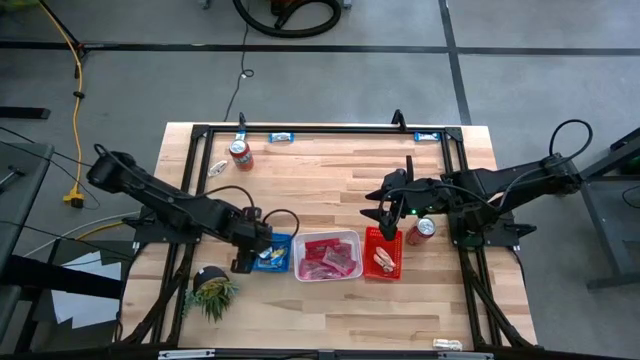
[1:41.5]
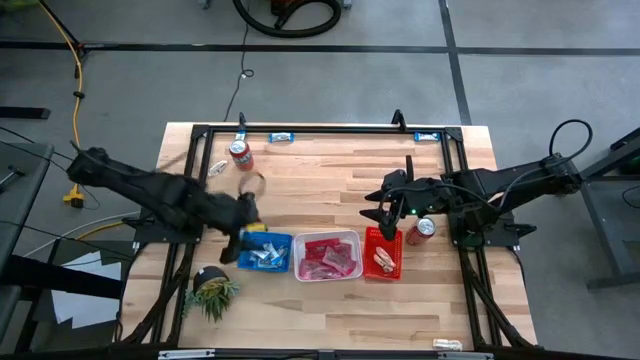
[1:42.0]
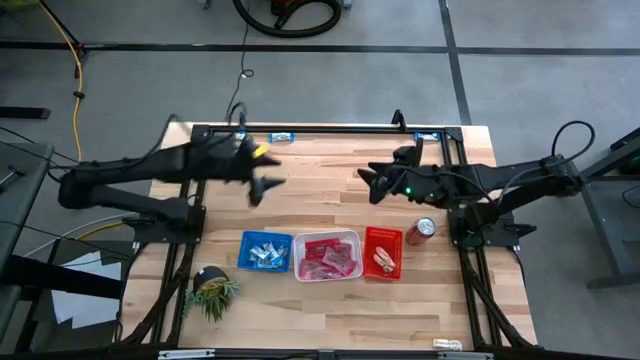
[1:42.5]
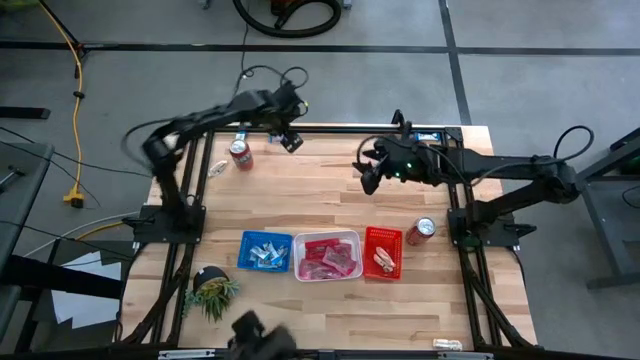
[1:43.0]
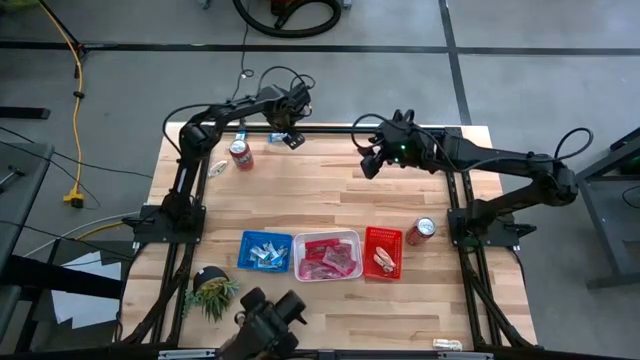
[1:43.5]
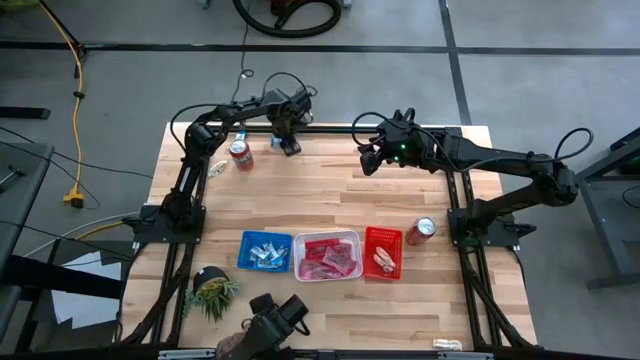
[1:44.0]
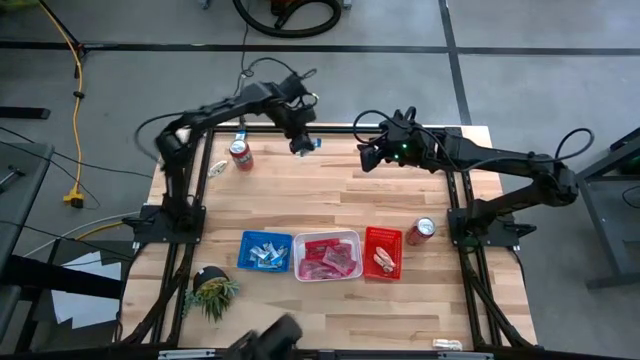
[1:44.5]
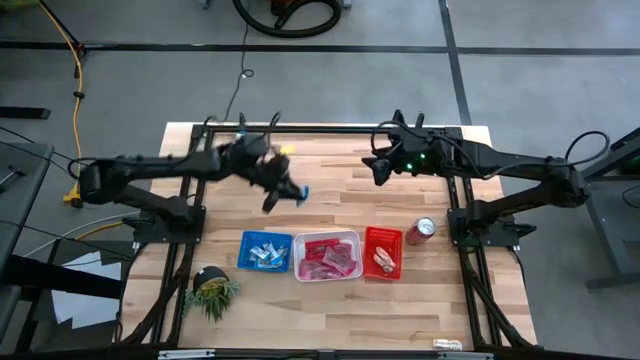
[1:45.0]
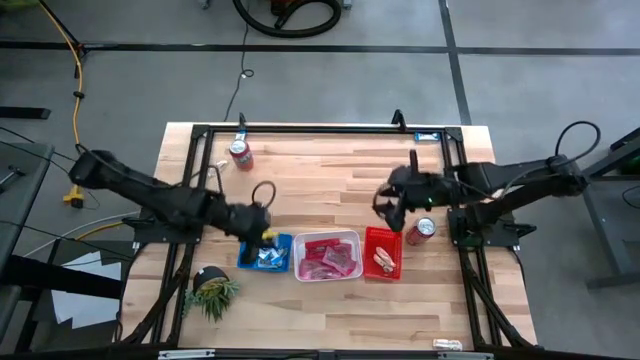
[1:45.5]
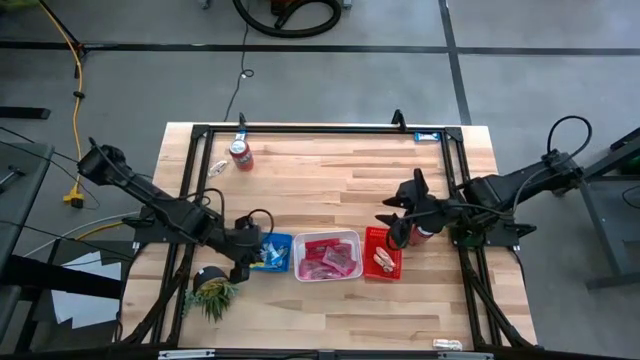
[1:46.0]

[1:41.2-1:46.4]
Task: Sort candy
Put the white chocolate into the blue bin

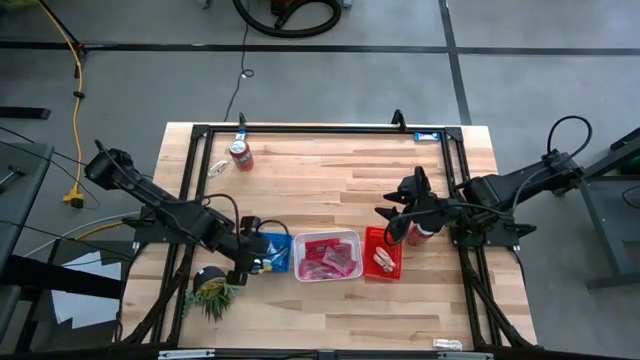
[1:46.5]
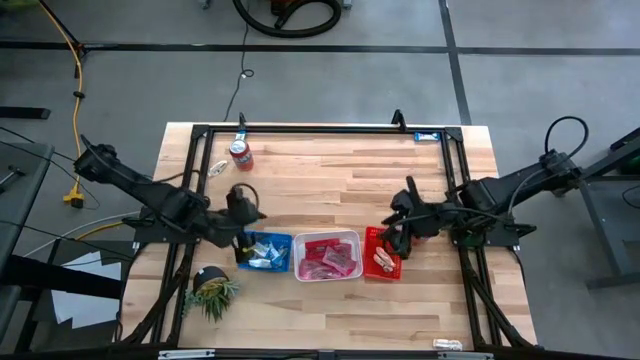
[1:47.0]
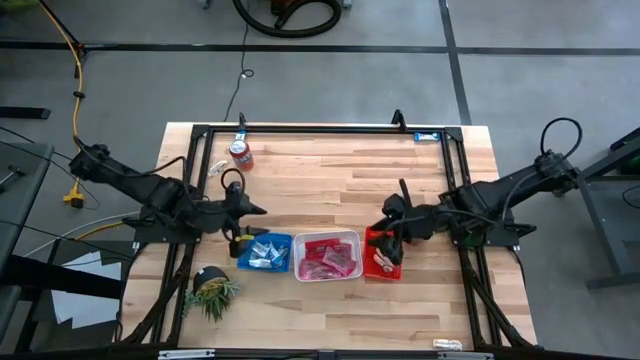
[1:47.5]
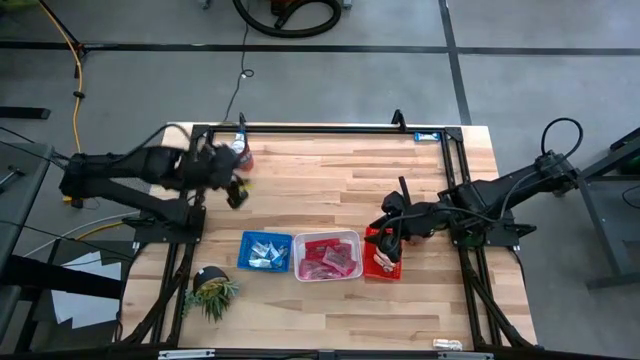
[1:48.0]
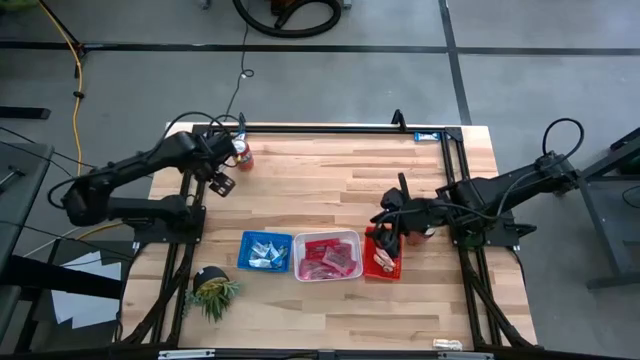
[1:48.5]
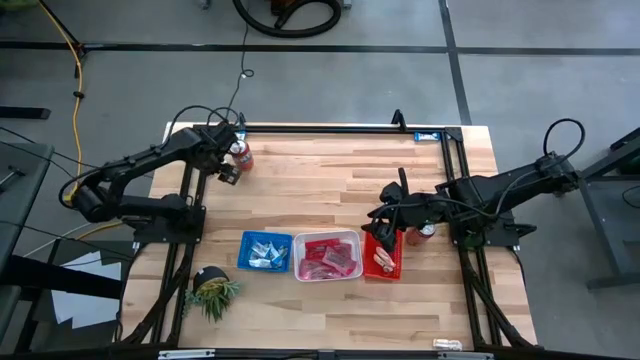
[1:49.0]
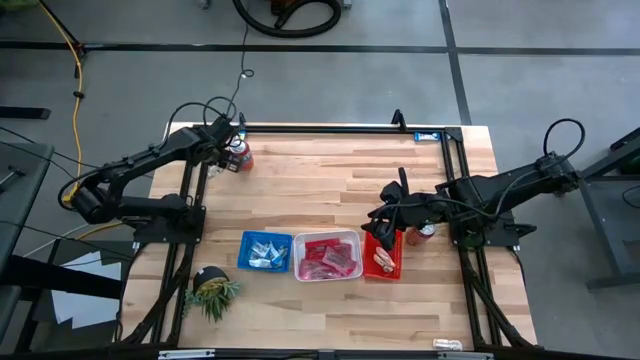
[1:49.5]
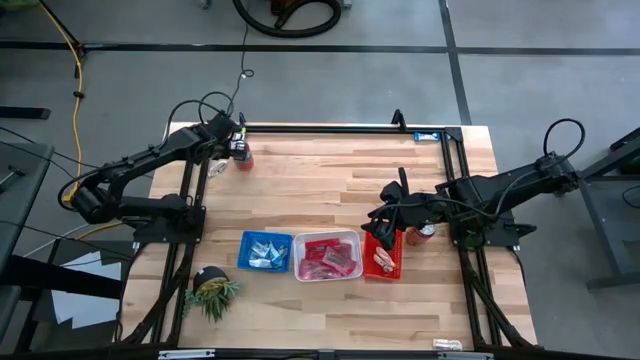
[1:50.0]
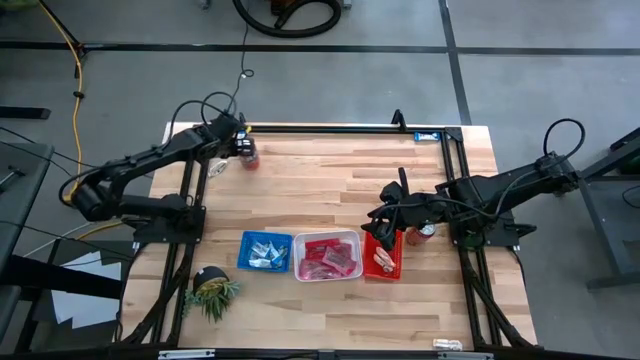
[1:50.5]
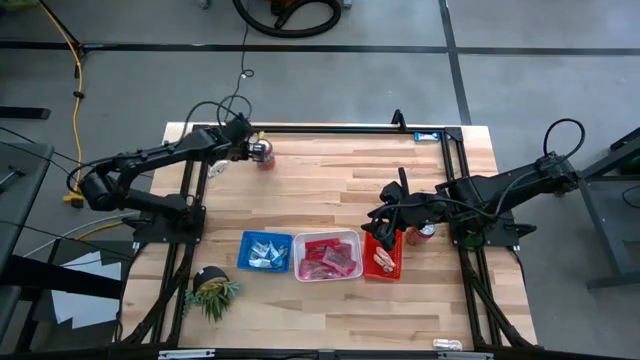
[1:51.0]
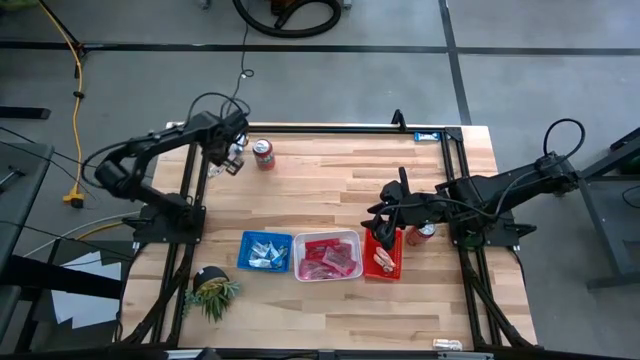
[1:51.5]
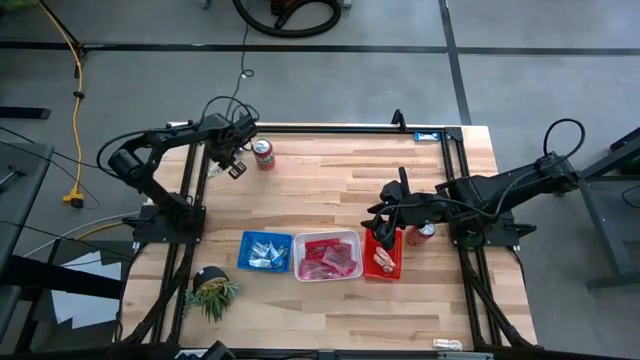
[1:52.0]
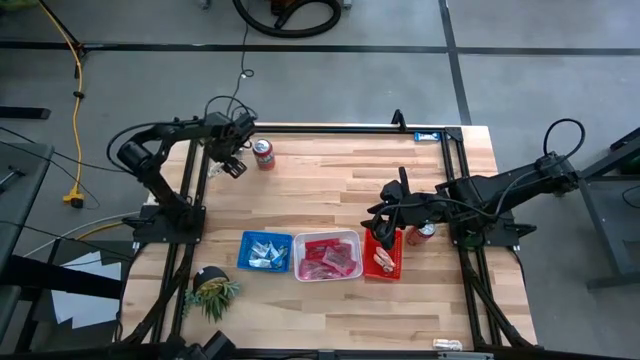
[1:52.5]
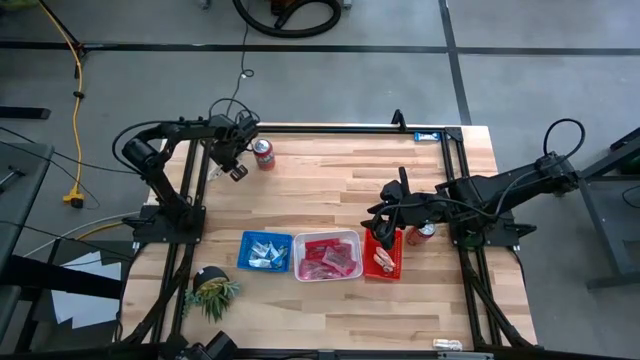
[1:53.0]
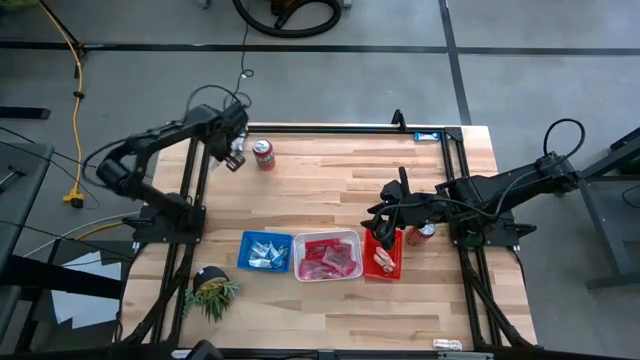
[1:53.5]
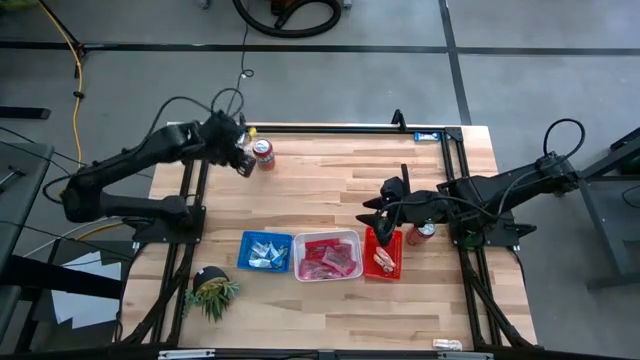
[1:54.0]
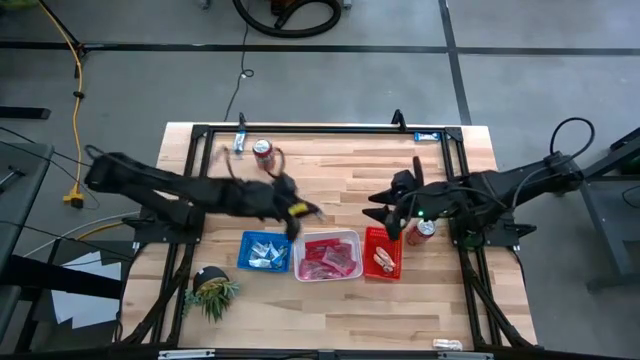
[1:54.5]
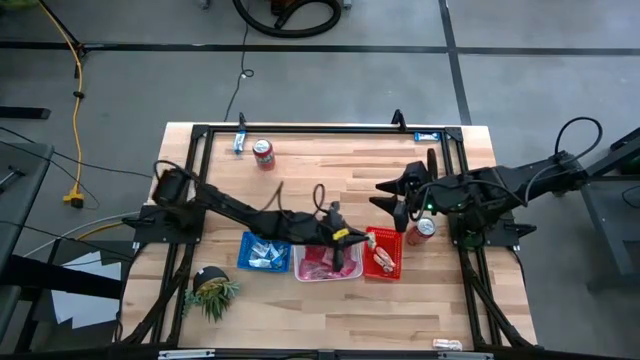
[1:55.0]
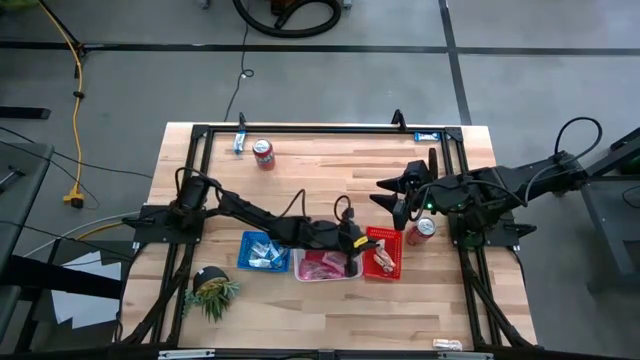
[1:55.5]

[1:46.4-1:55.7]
Put the brown chocolate into the red bin

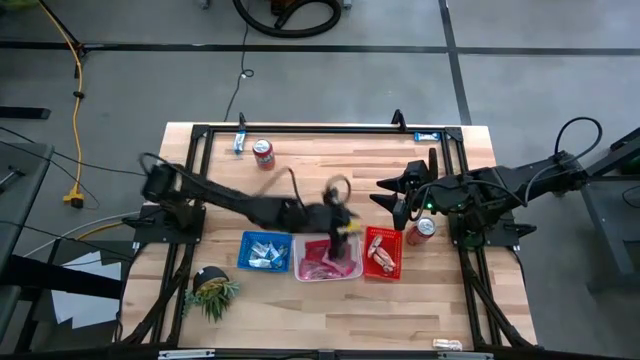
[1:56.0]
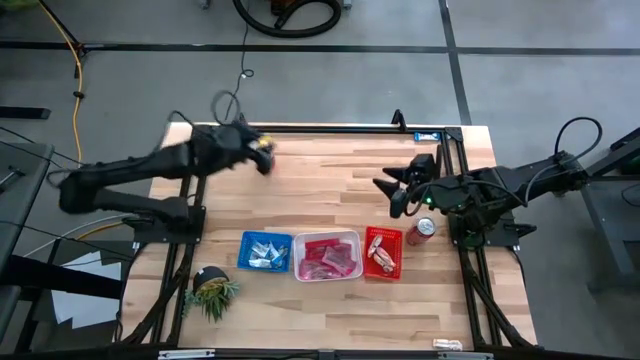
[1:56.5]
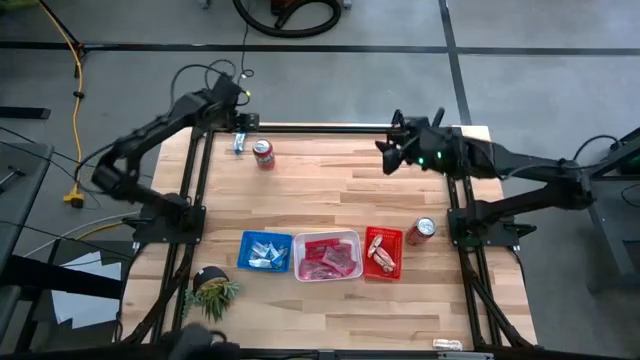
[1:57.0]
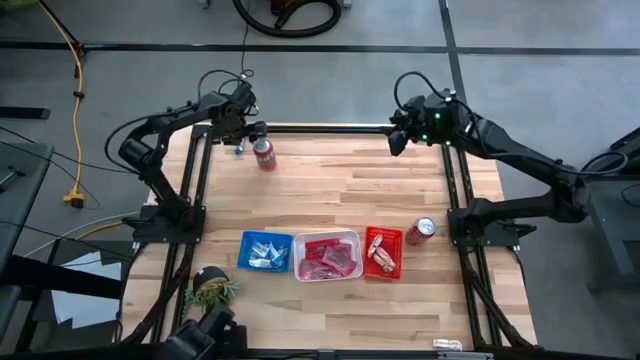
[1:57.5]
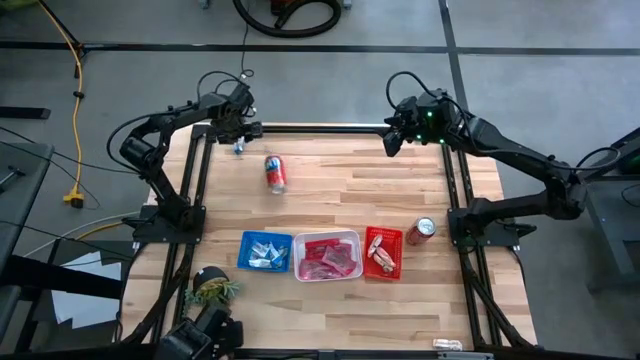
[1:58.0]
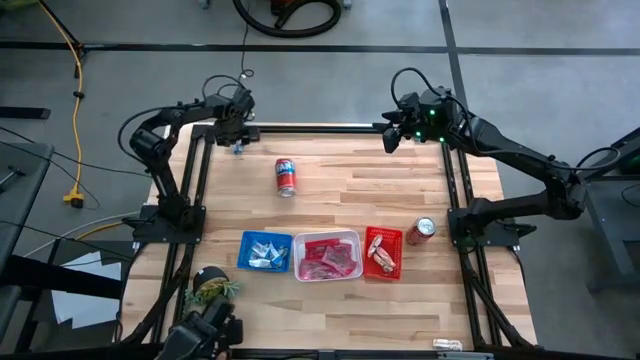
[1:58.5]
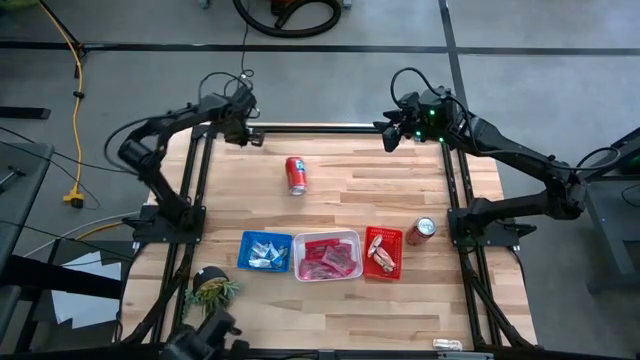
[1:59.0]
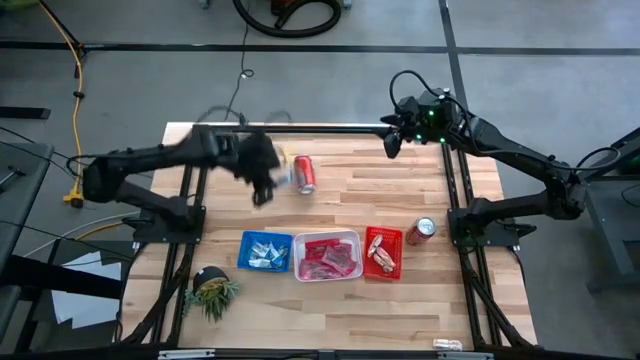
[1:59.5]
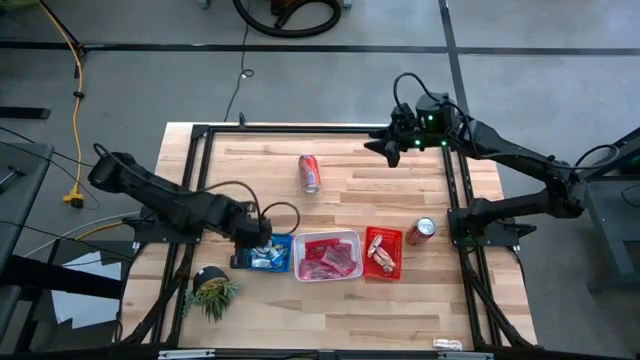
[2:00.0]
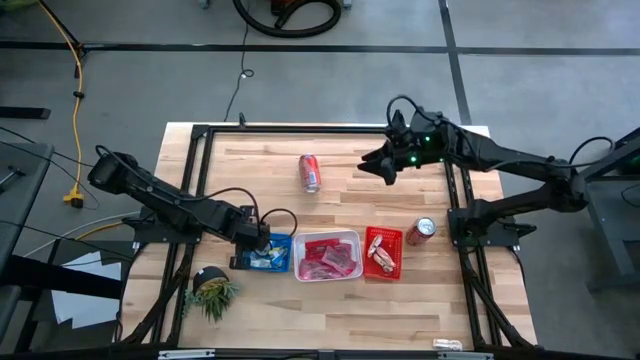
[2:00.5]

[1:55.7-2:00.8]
Put the white chocolate into the blue bin

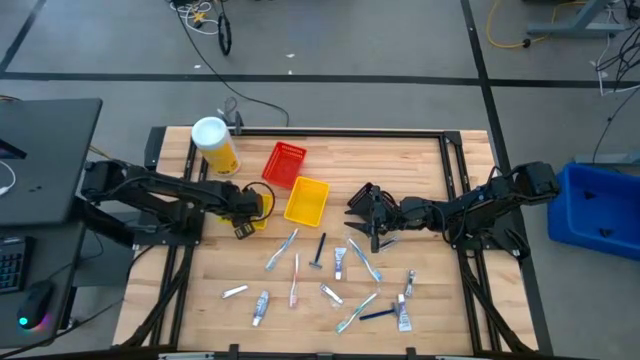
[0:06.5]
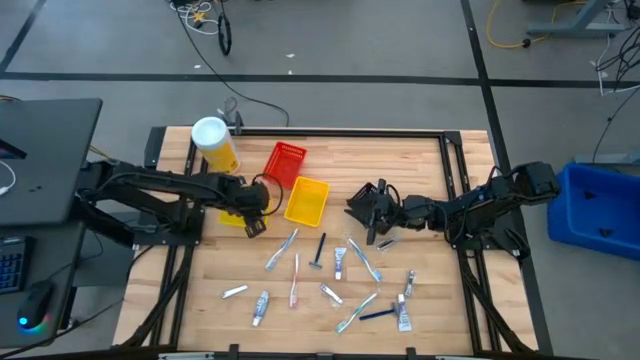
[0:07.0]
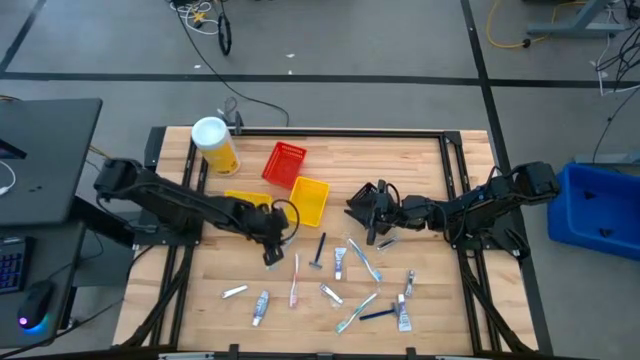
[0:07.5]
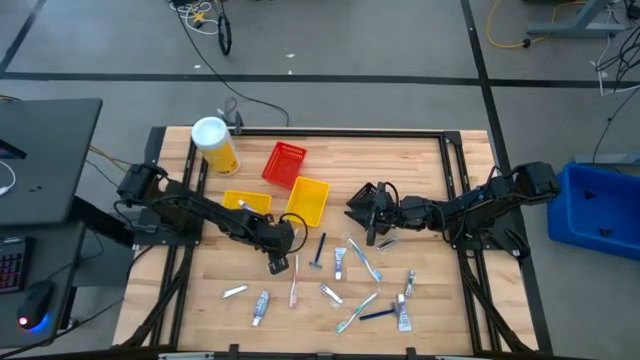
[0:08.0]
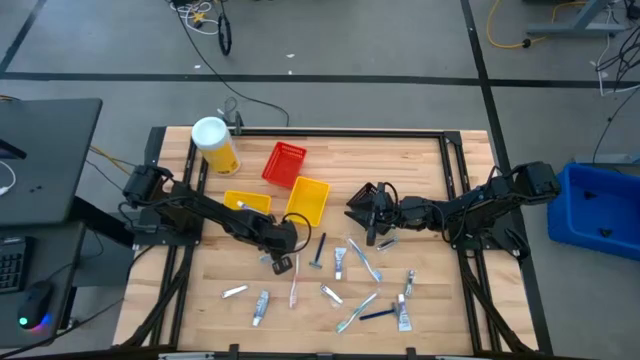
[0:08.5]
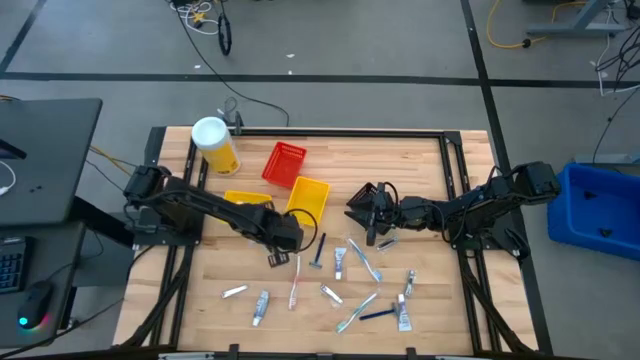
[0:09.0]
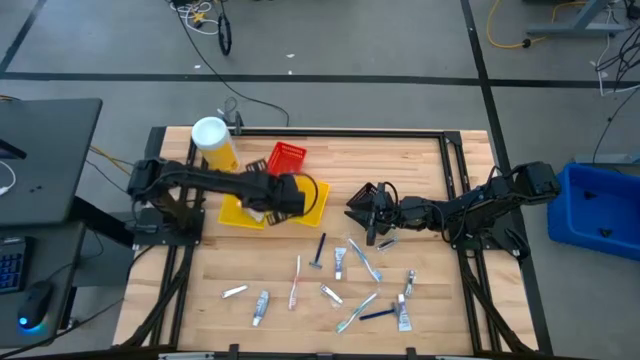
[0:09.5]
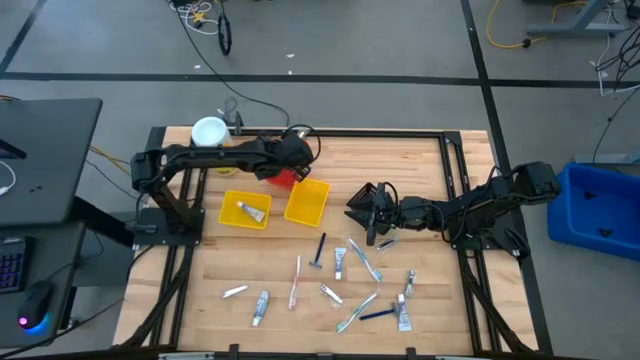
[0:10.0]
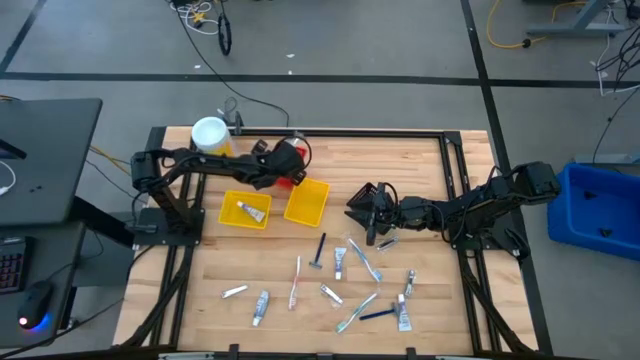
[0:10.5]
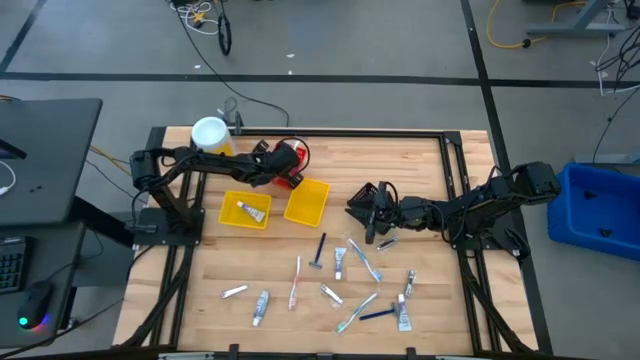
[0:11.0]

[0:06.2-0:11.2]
Task: Pick & Place Travel size toiletries
Put the blue toothbrush into the red bin
